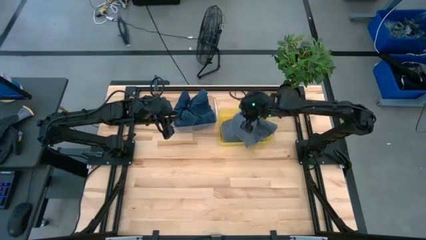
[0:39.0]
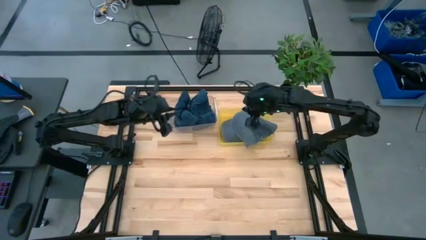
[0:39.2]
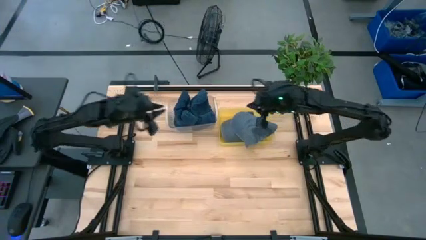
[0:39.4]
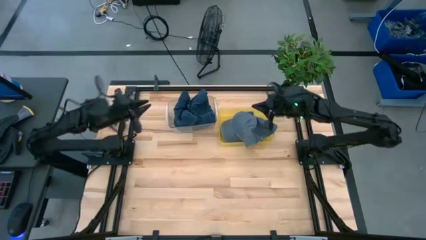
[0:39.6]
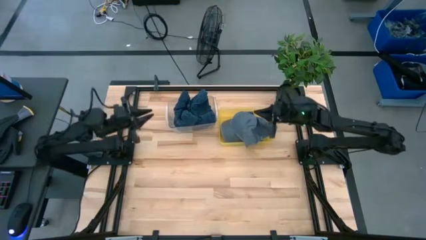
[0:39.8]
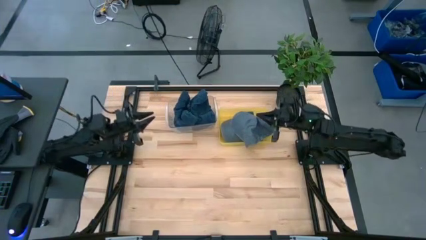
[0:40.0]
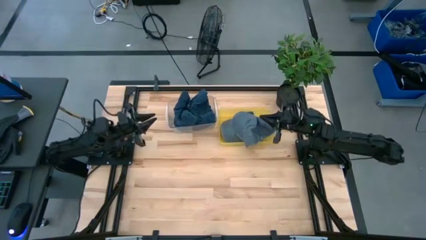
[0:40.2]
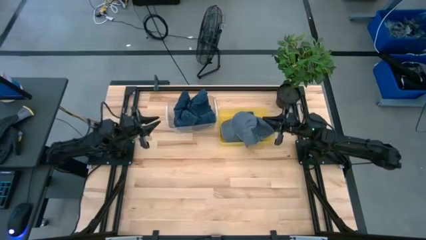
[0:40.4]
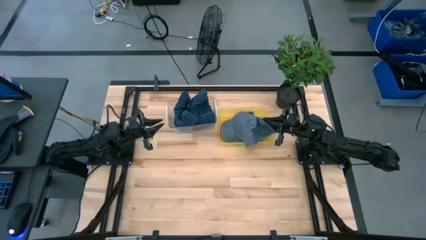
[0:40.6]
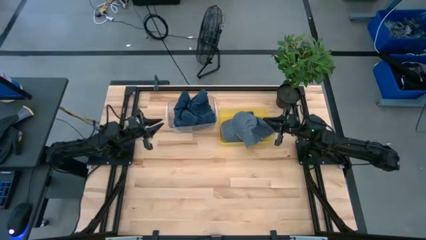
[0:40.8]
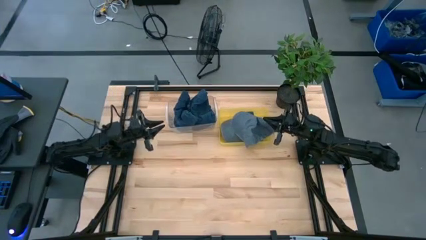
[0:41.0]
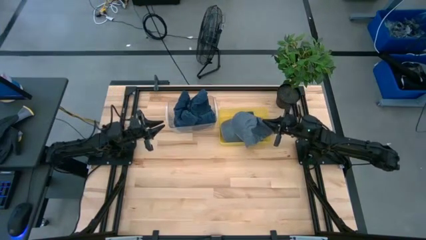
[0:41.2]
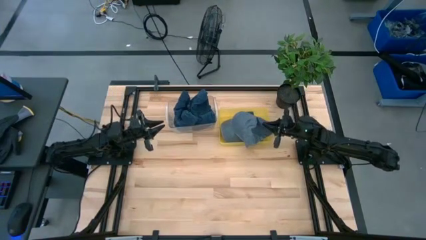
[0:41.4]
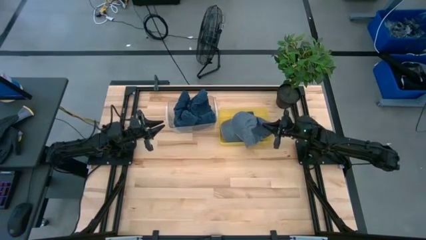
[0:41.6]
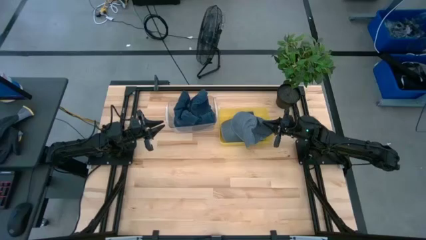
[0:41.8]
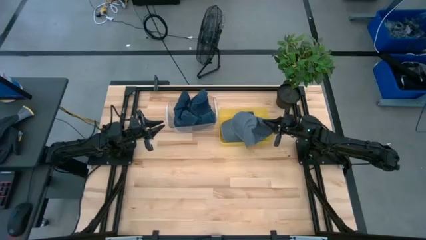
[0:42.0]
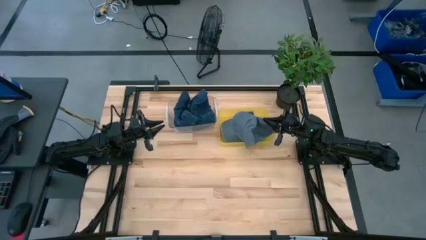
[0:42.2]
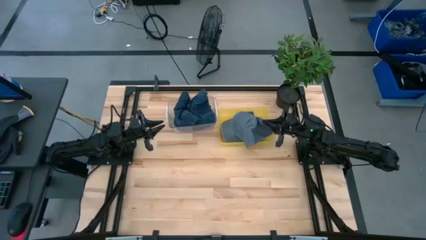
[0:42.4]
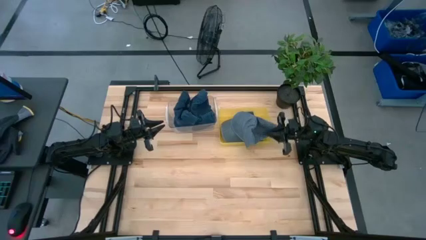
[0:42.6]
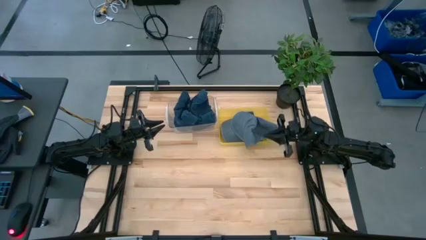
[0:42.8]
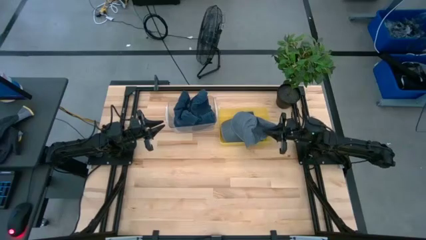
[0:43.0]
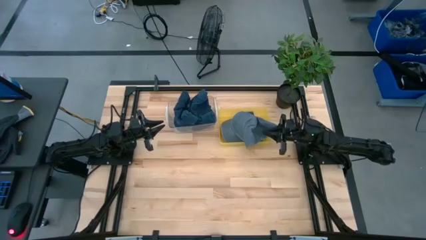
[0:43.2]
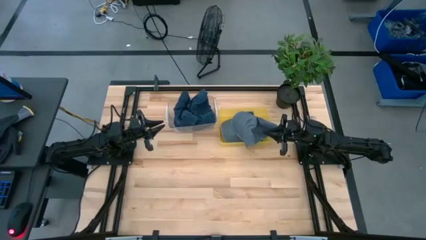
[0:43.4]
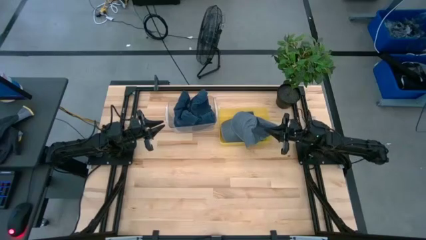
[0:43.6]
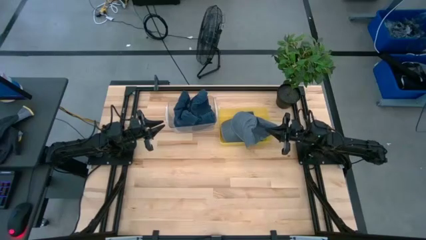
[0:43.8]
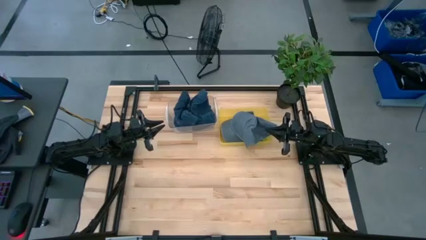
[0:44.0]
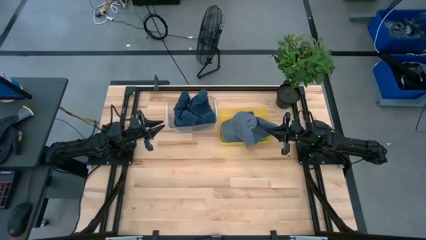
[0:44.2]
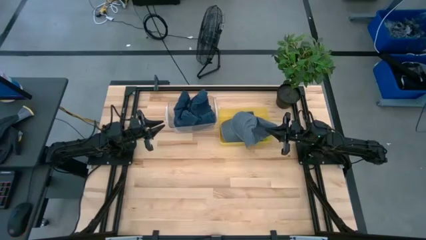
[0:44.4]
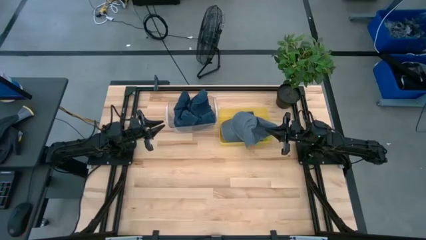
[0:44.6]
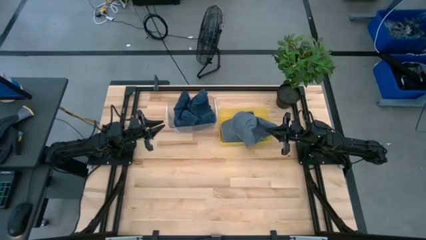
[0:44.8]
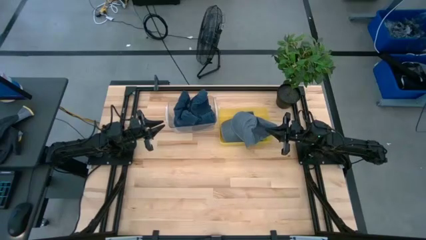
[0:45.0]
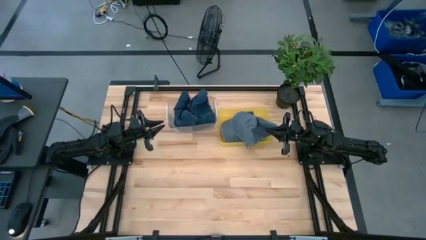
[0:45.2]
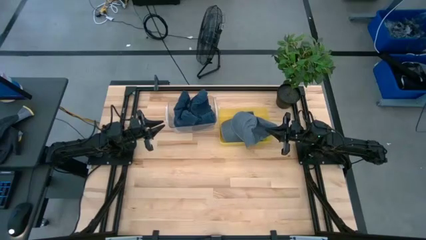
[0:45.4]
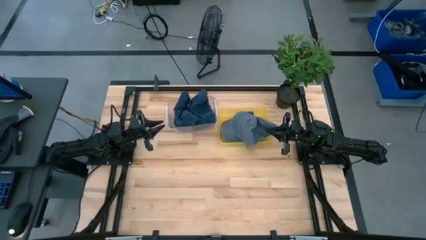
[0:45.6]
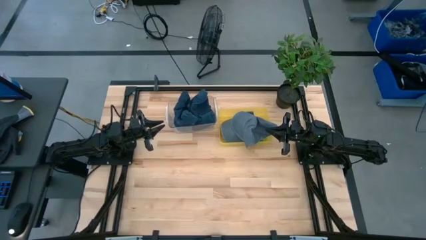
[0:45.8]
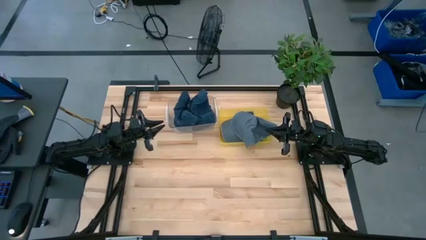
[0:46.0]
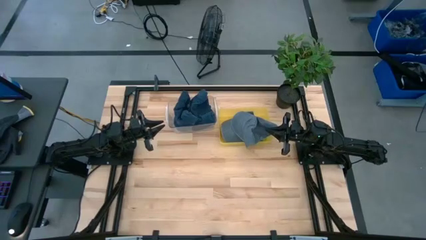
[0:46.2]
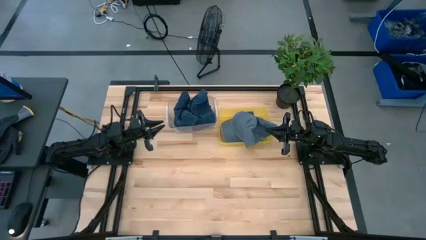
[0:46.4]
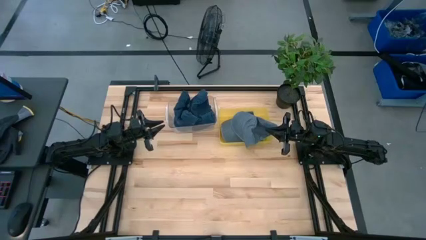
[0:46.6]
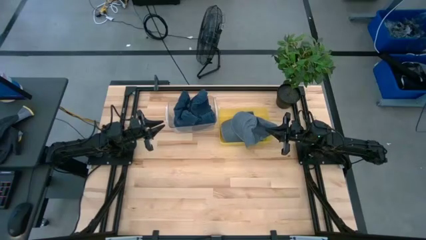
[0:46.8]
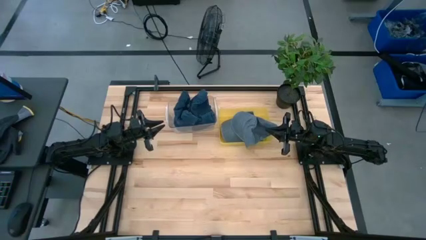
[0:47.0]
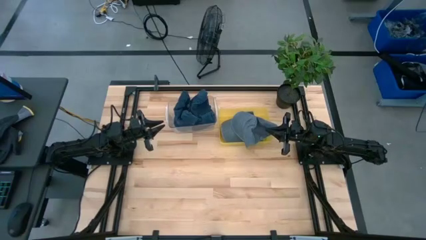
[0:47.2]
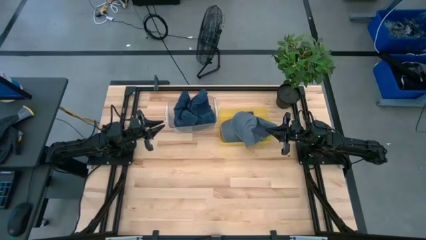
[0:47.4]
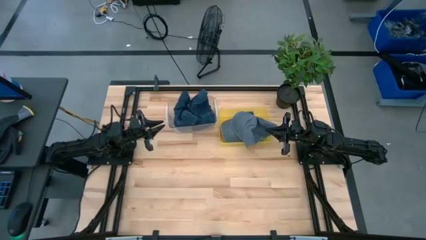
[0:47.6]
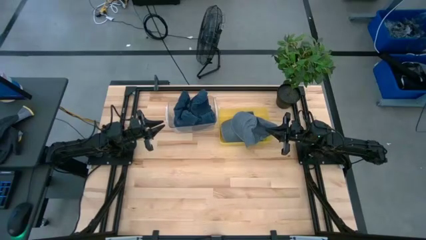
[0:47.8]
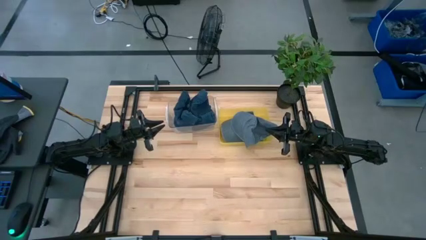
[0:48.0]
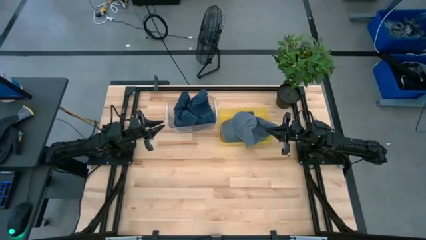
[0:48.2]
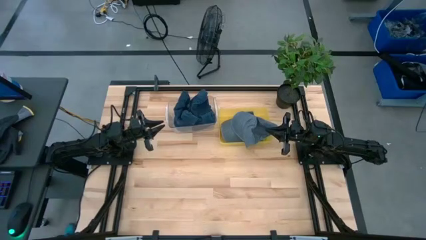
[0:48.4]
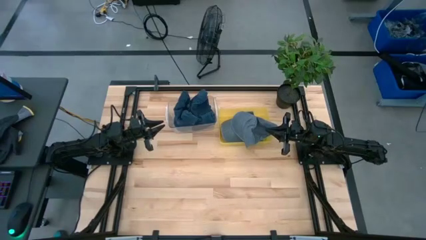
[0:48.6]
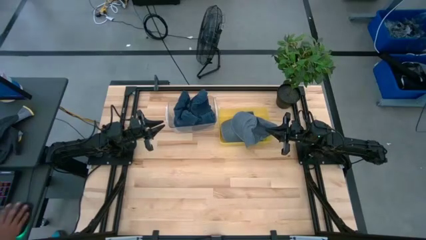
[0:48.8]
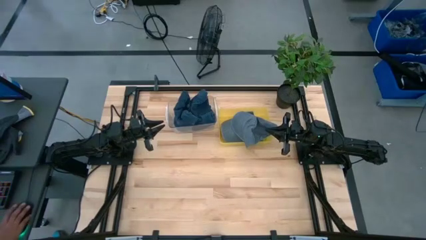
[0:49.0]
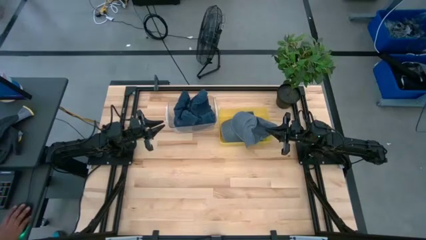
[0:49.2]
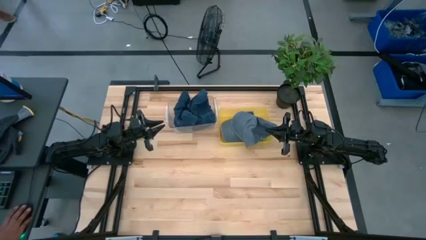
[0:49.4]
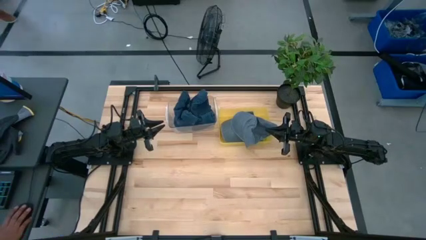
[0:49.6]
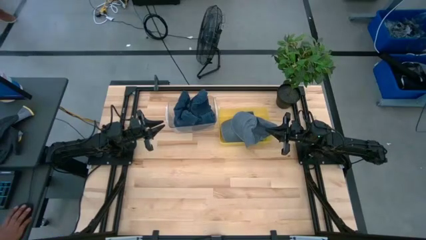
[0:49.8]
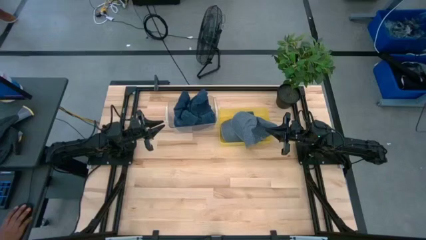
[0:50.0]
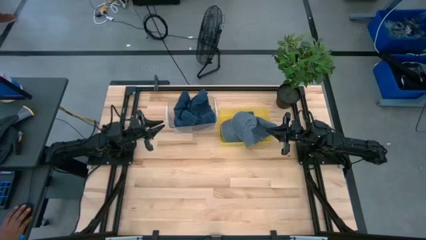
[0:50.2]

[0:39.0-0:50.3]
Task: Pick & Place hat
Return to home position
